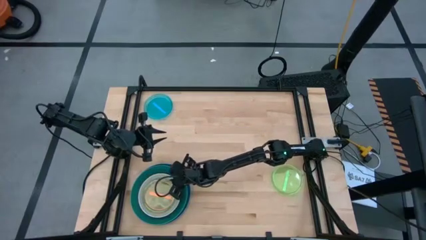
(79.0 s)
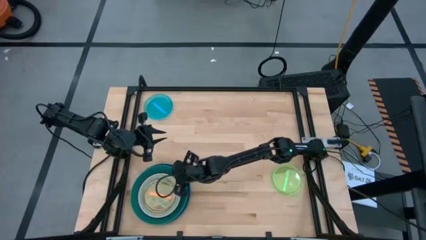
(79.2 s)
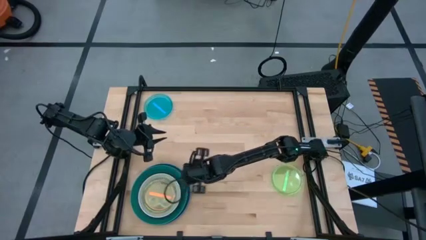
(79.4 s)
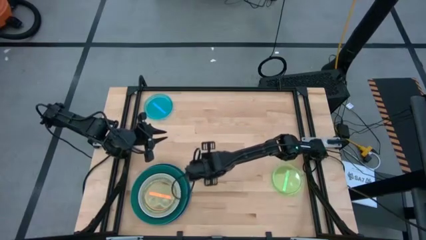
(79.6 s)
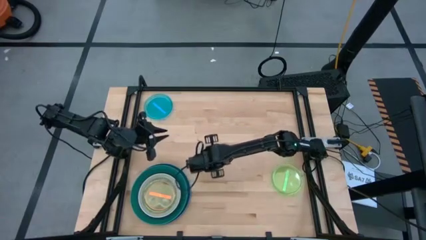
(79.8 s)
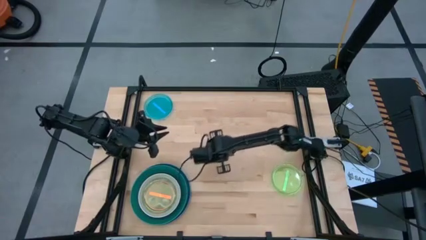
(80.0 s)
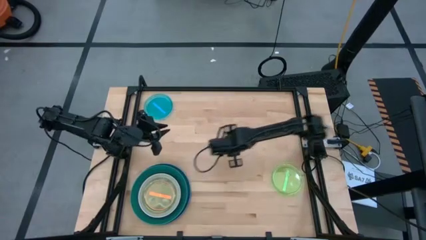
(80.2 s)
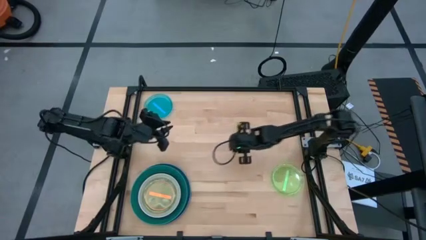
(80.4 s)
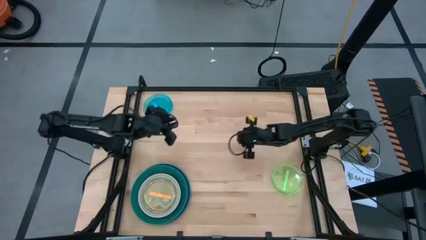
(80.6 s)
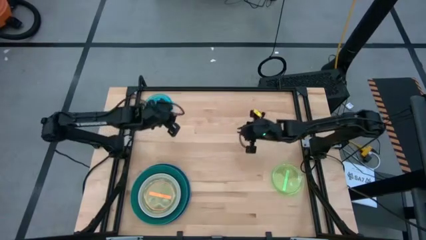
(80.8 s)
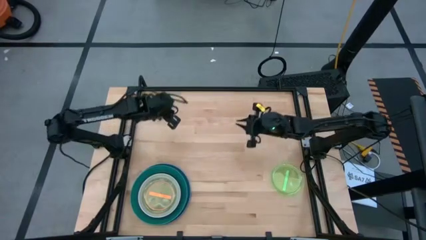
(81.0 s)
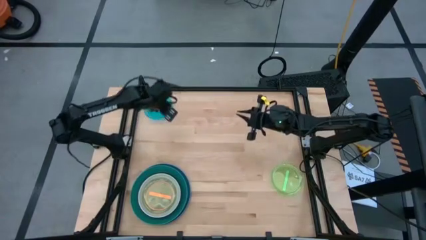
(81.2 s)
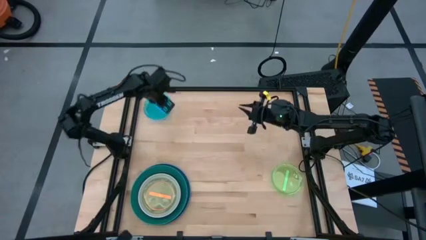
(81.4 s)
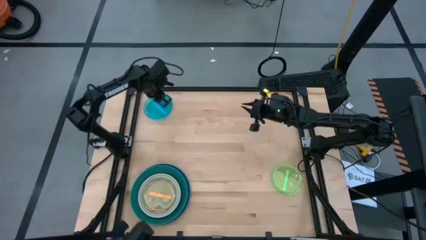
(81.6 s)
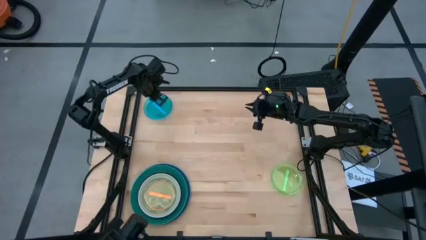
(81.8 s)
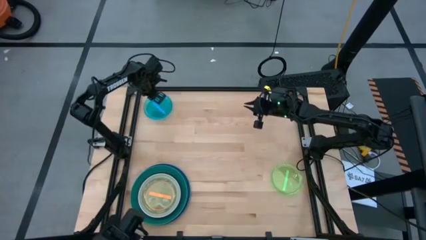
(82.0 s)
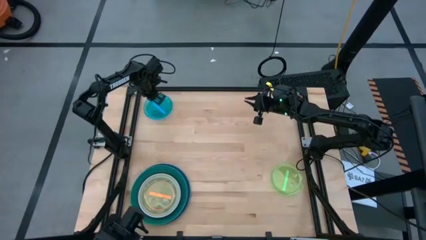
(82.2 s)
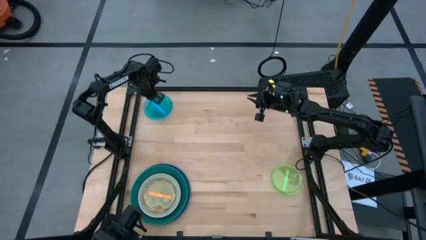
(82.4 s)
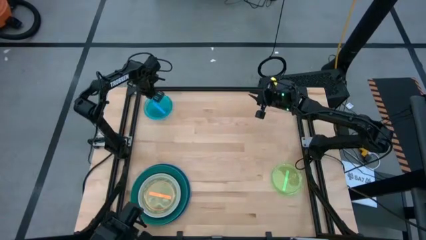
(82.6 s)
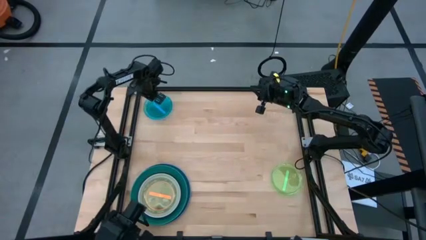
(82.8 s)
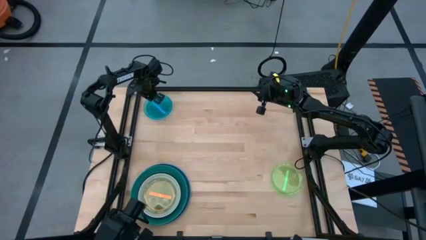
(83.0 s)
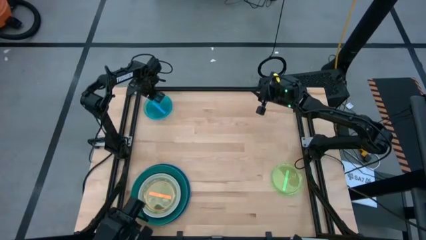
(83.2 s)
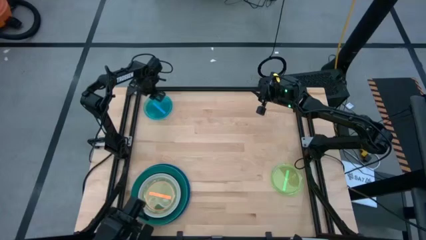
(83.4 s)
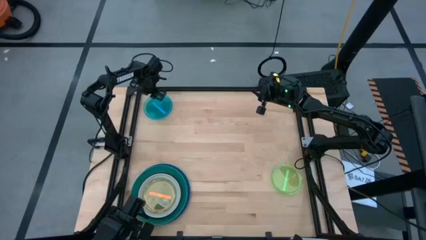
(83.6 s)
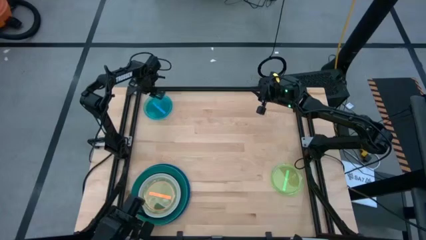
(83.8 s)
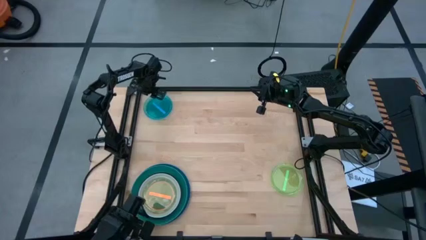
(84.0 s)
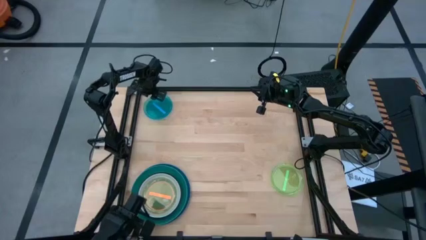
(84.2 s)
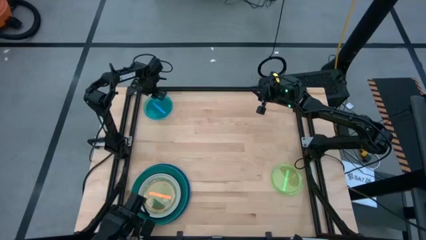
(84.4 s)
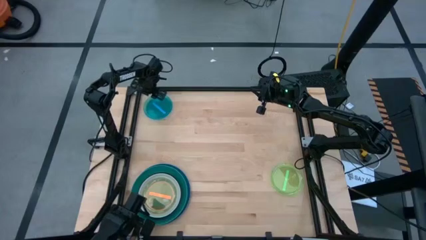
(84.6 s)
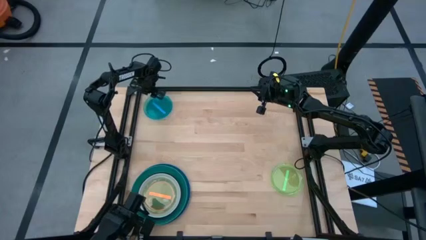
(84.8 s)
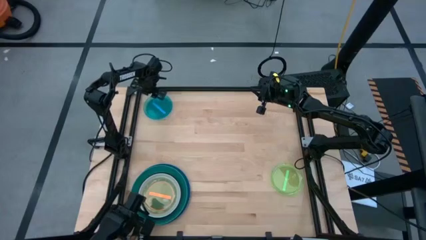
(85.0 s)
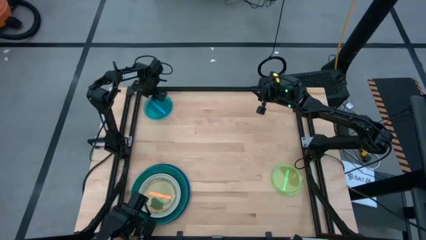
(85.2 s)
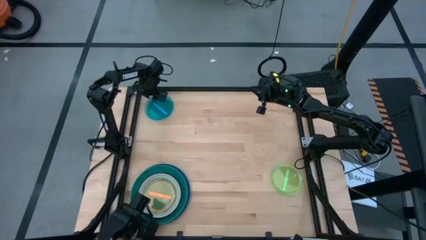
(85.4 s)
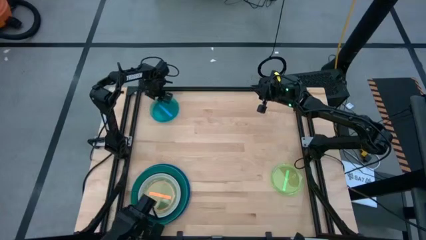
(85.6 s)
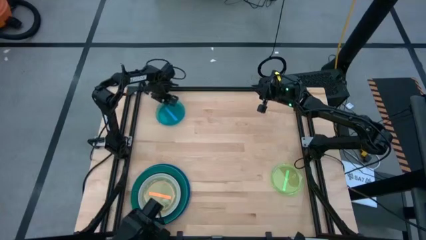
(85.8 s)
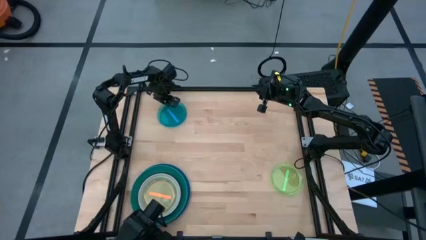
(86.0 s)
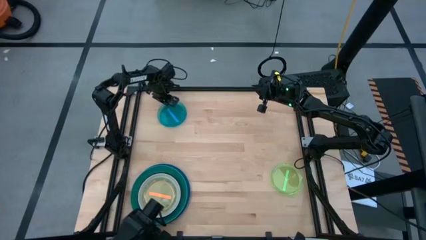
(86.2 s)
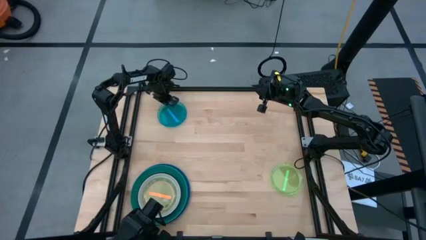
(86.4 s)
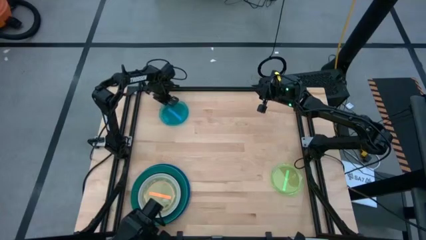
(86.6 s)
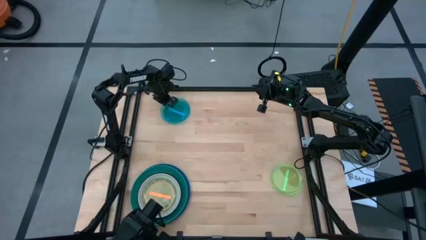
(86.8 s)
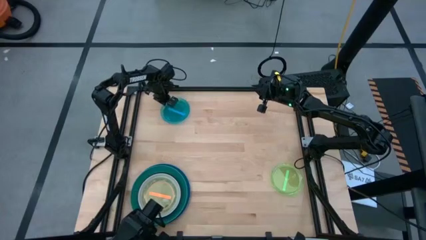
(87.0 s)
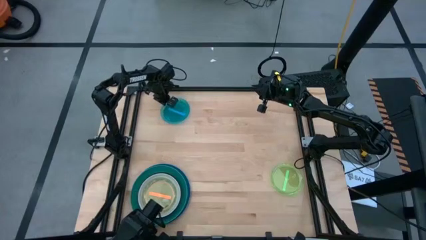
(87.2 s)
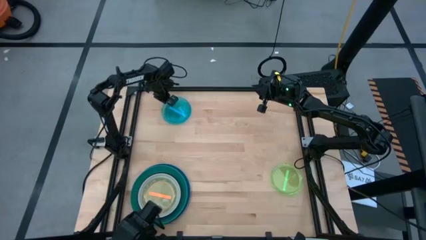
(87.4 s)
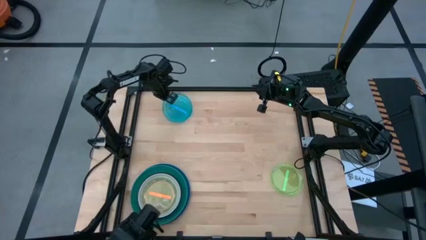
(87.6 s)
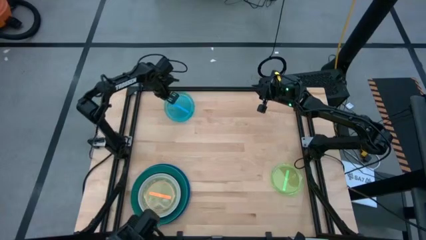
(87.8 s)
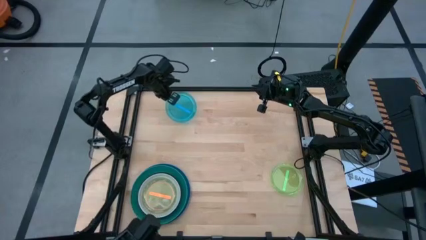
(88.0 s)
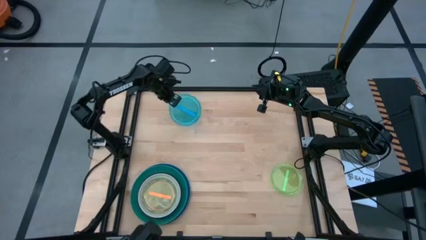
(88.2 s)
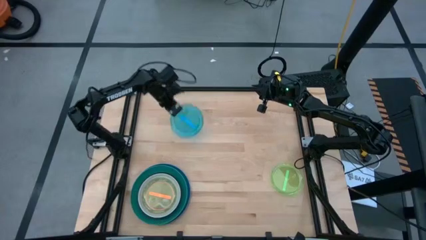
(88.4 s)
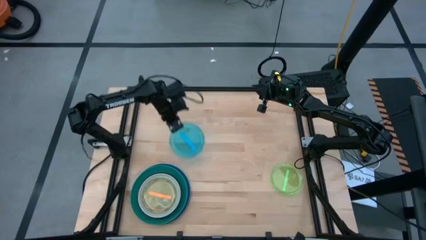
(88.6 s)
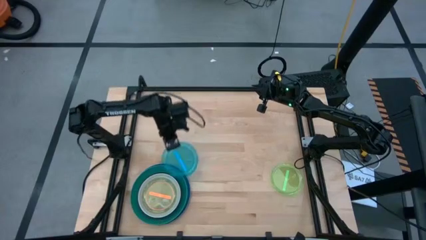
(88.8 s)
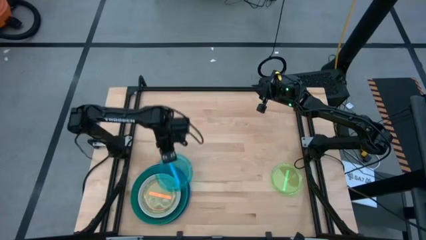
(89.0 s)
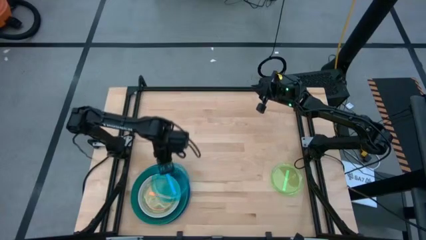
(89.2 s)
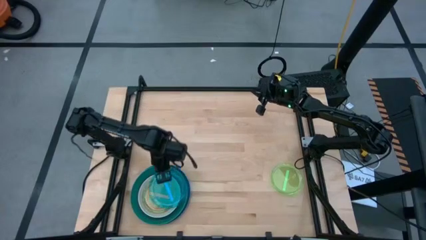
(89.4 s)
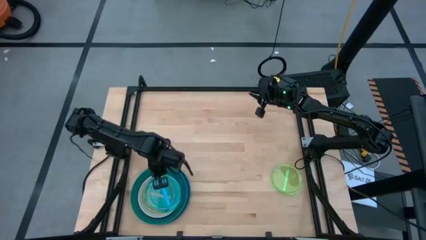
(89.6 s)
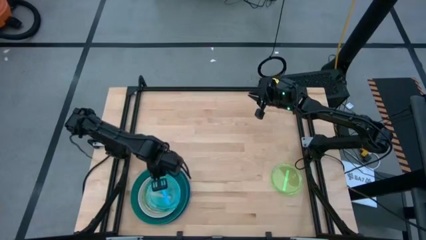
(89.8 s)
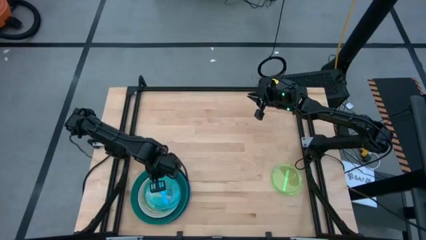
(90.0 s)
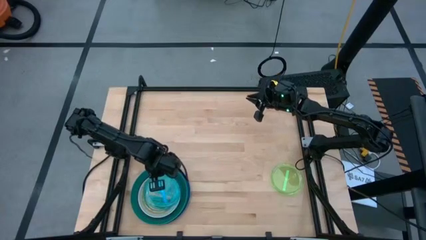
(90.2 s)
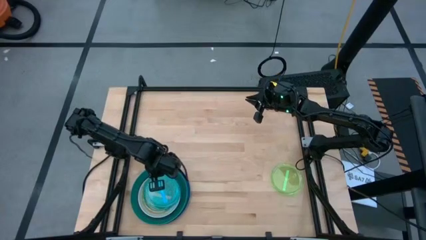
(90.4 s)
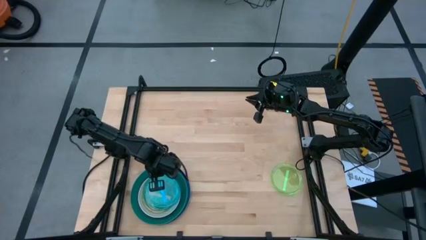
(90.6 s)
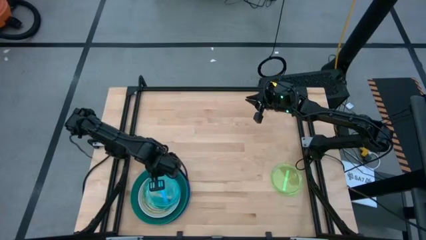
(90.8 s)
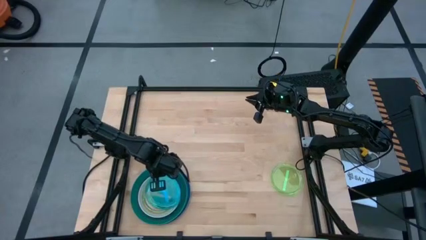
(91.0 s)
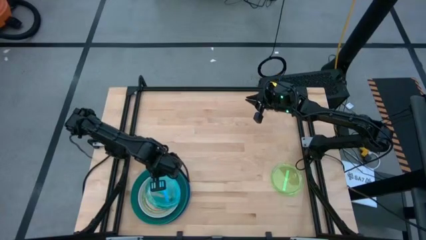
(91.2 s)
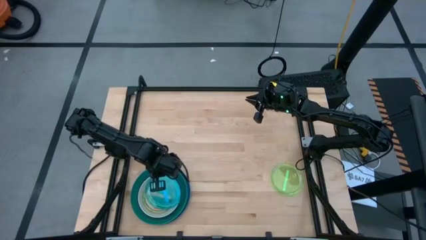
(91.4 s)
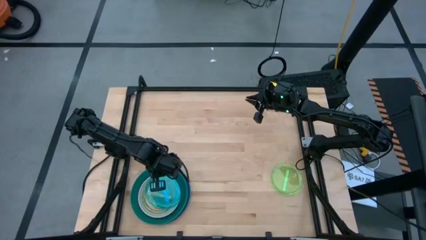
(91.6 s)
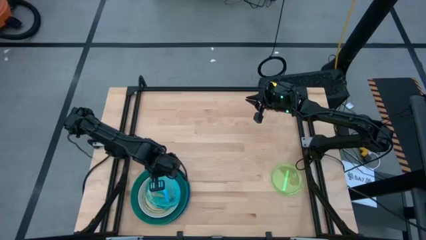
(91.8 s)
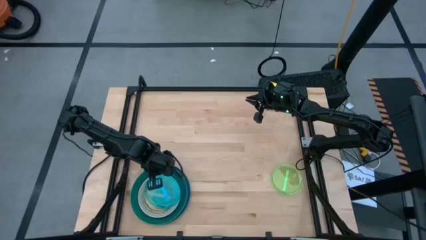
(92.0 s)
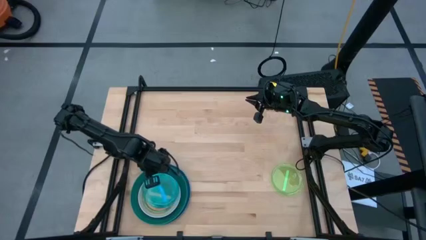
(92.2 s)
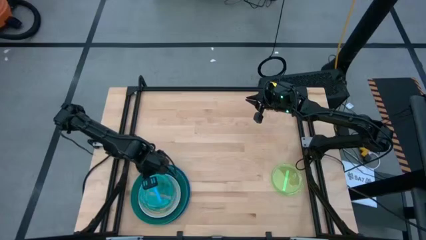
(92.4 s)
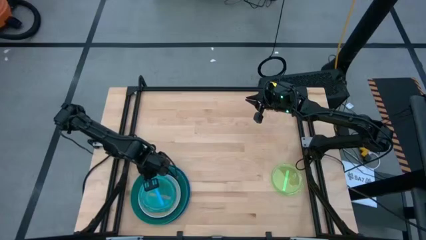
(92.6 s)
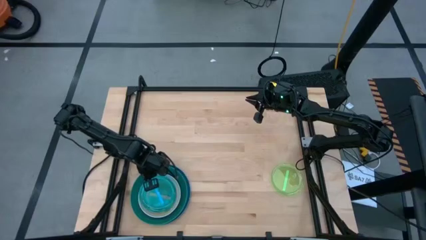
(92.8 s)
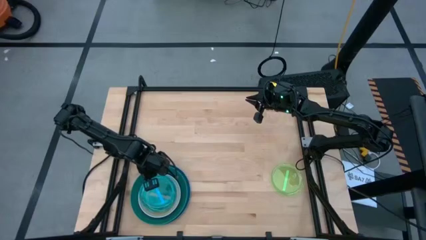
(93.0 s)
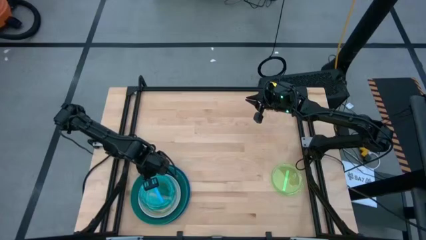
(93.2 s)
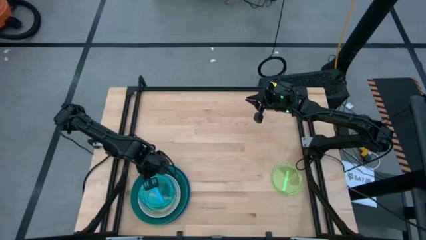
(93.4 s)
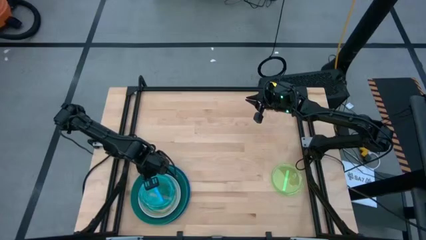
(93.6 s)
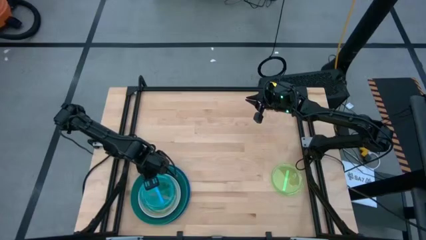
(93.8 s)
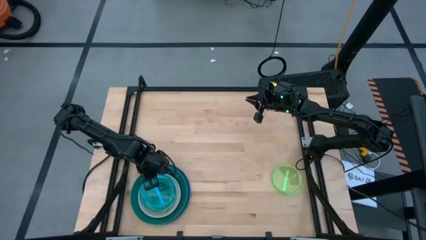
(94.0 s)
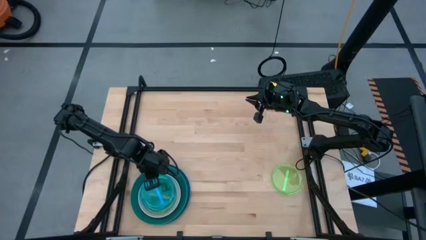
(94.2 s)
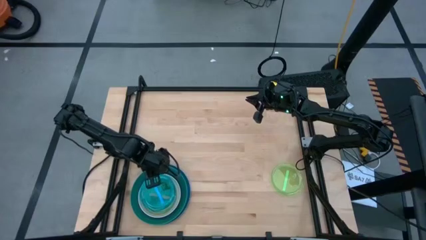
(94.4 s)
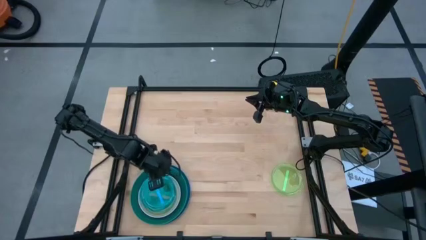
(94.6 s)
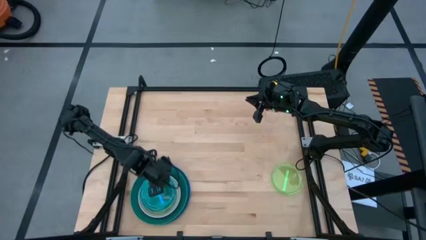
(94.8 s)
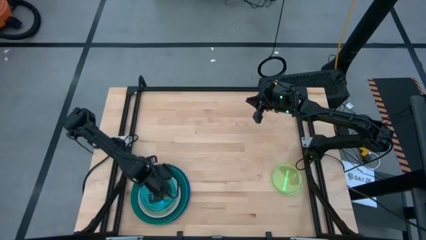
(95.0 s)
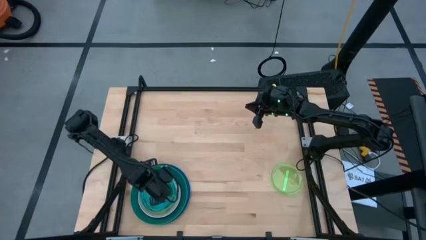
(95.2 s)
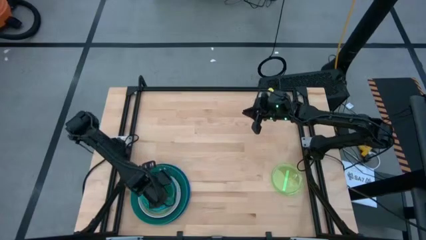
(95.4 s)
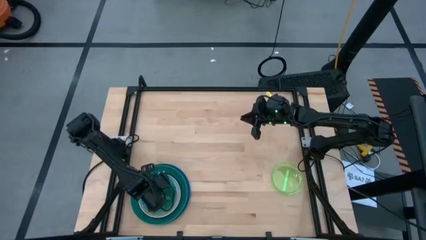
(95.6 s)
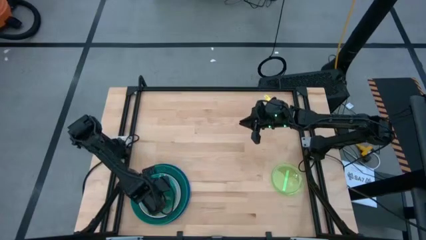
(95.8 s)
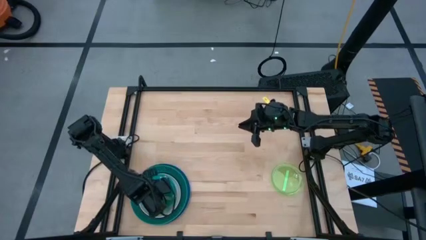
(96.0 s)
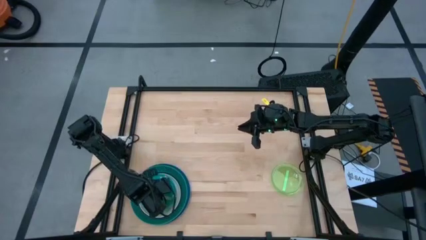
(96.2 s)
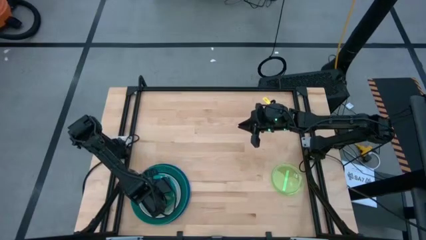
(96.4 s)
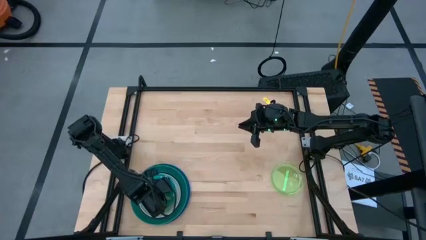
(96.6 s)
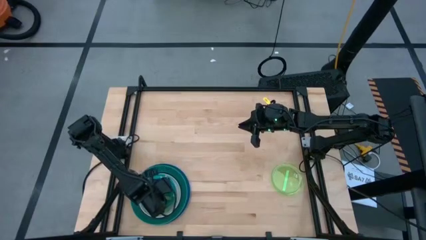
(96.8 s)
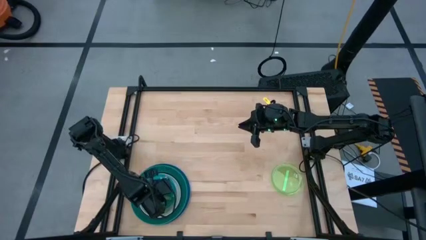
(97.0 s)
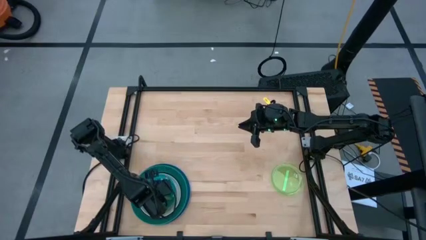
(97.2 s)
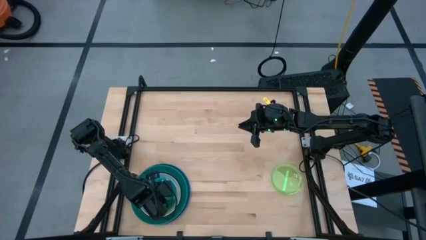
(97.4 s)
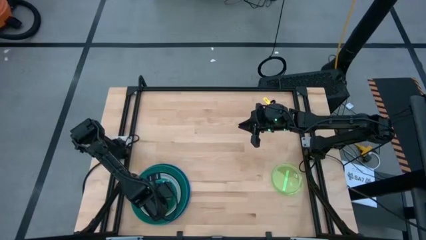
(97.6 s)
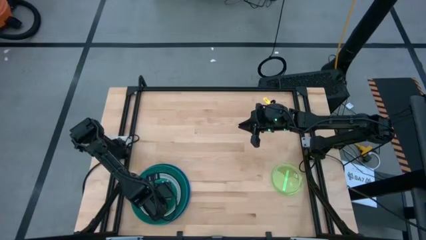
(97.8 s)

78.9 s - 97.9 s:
Task: Stack plastic plates
Stack the light blue plate on top of the orange plate
